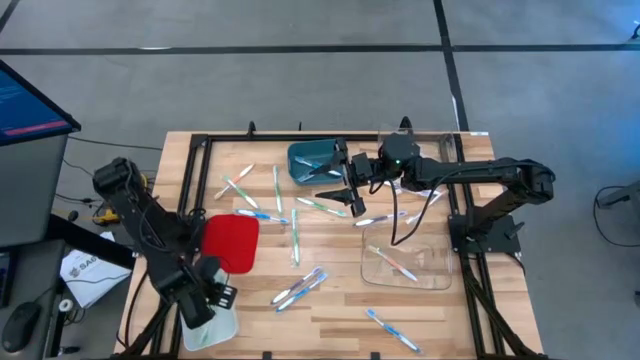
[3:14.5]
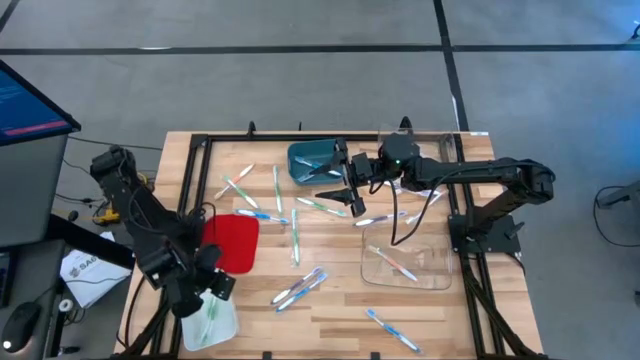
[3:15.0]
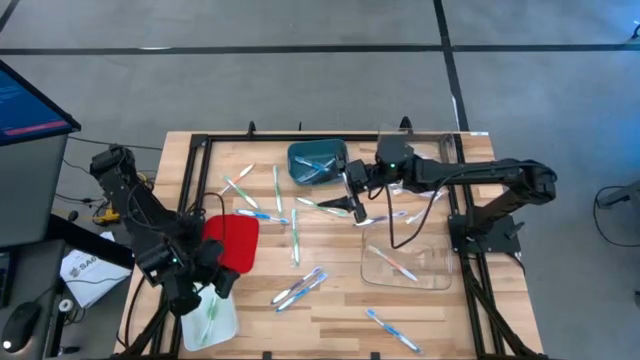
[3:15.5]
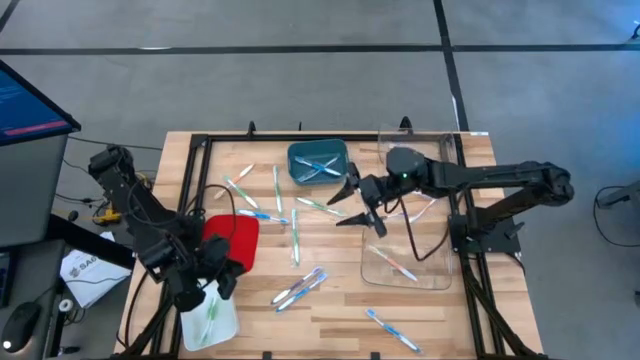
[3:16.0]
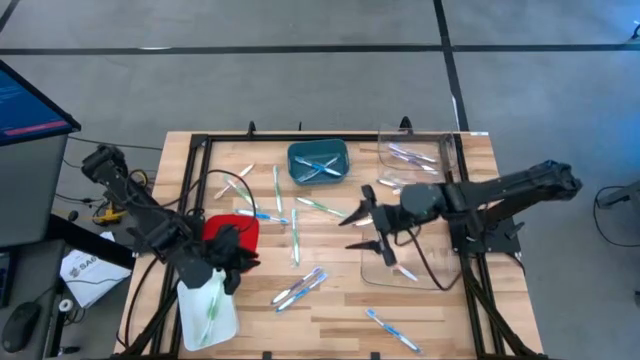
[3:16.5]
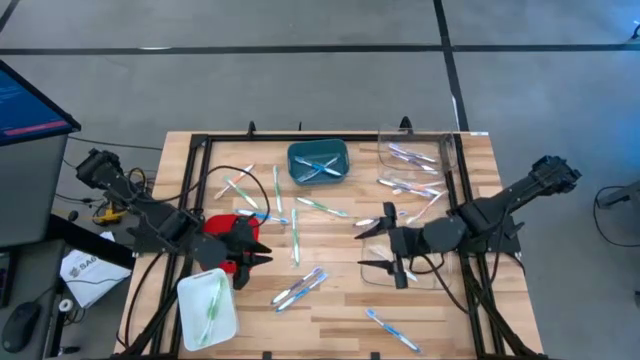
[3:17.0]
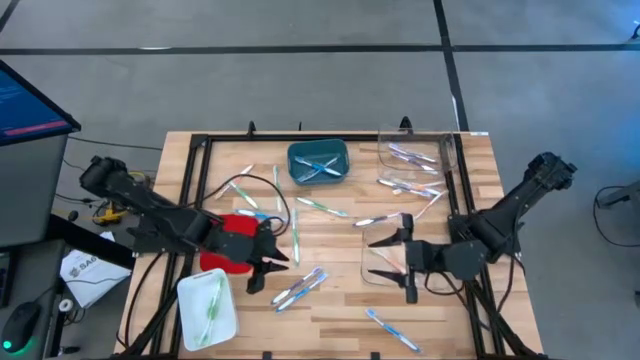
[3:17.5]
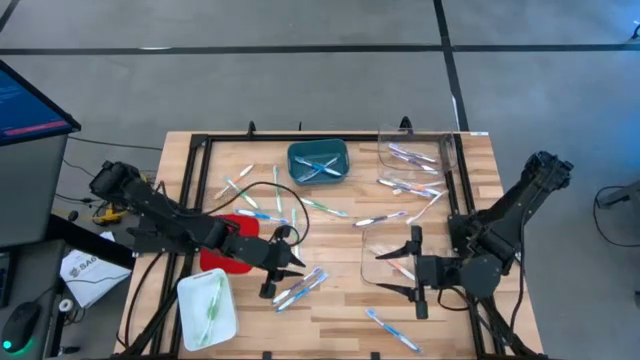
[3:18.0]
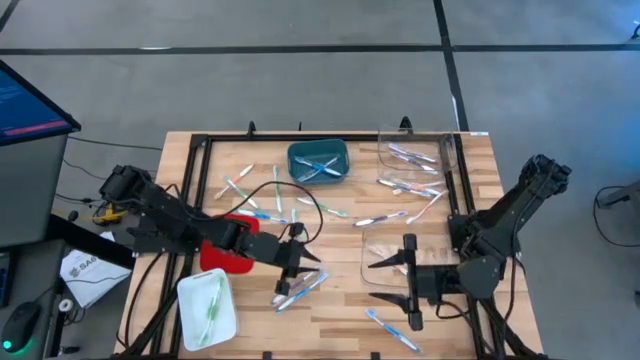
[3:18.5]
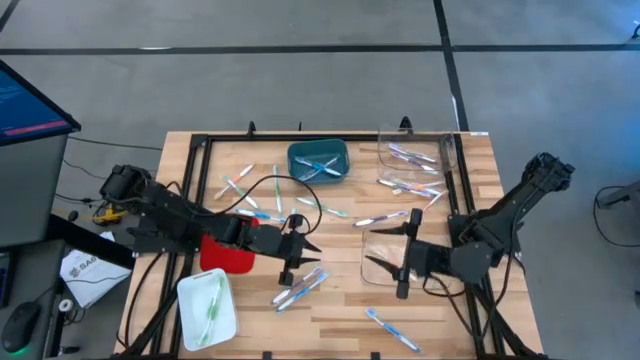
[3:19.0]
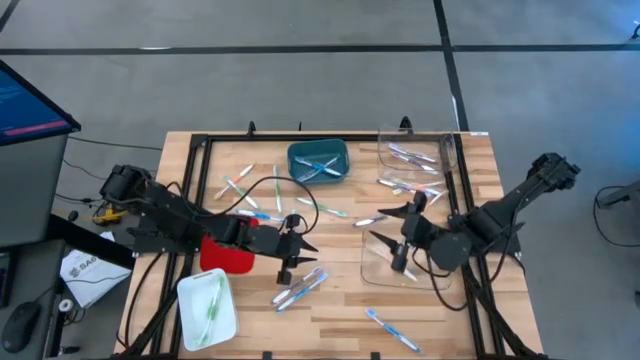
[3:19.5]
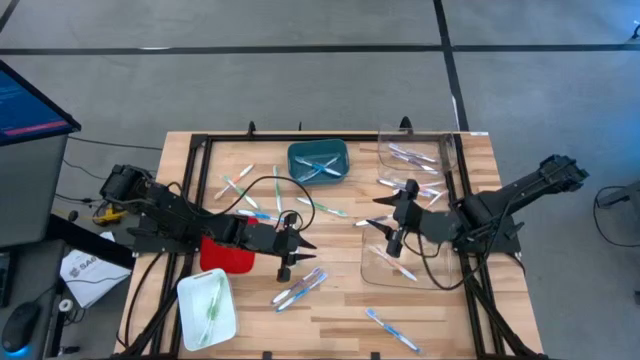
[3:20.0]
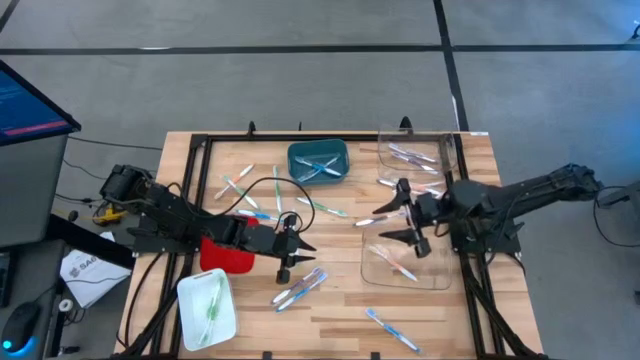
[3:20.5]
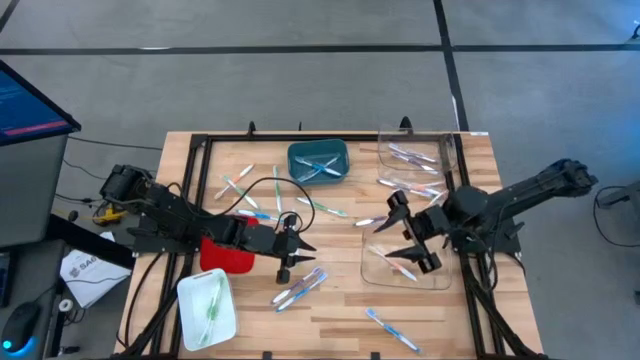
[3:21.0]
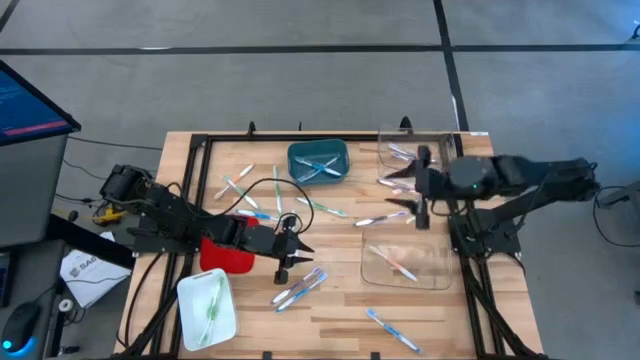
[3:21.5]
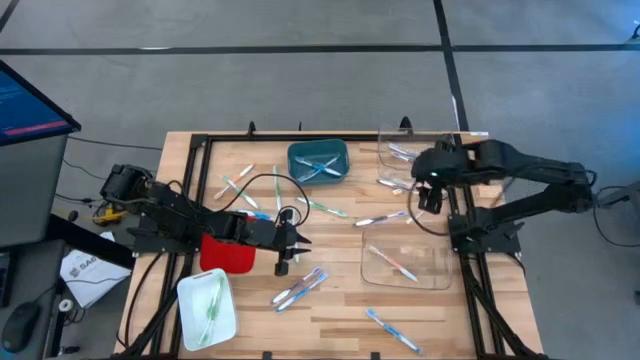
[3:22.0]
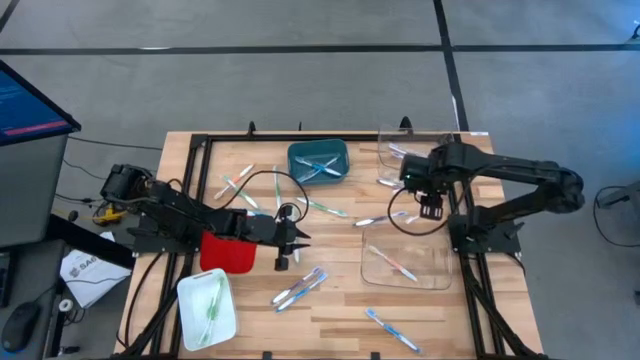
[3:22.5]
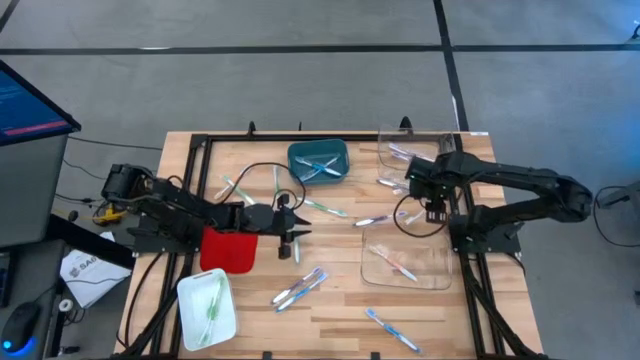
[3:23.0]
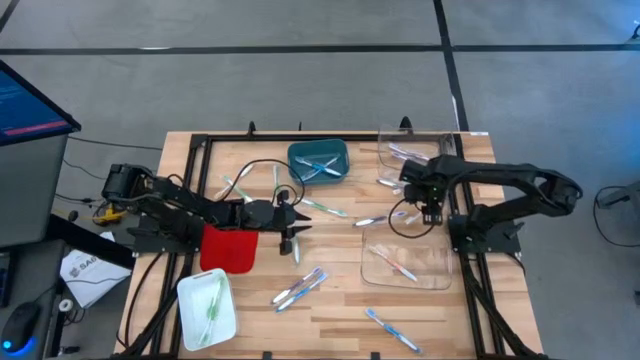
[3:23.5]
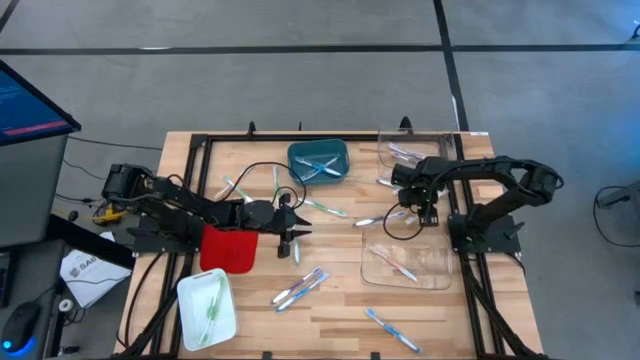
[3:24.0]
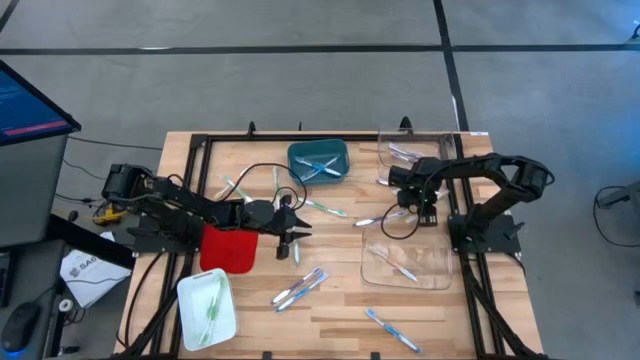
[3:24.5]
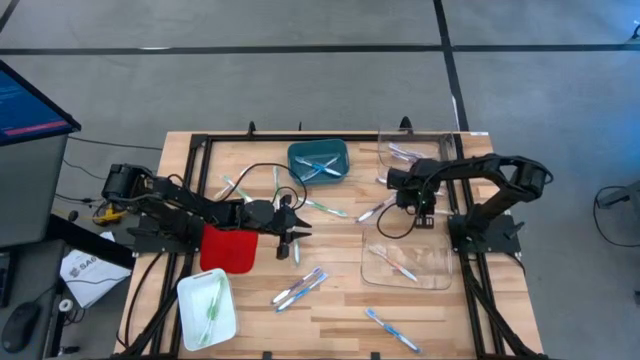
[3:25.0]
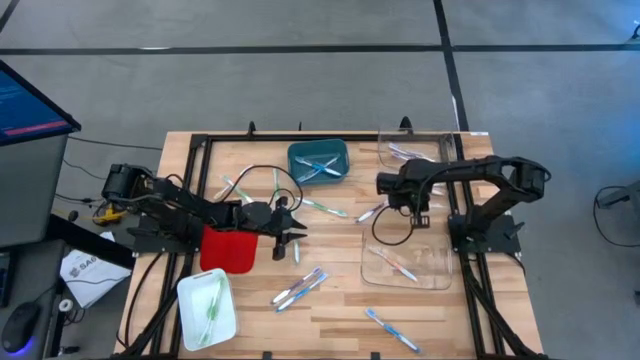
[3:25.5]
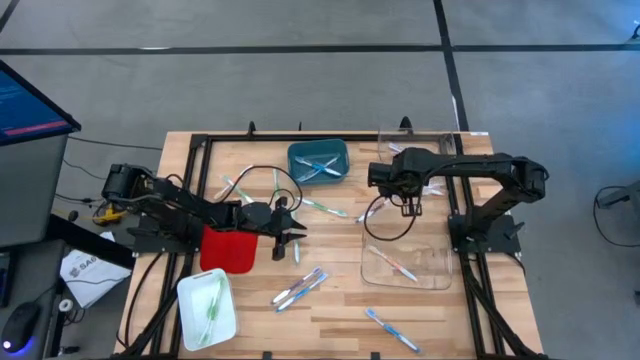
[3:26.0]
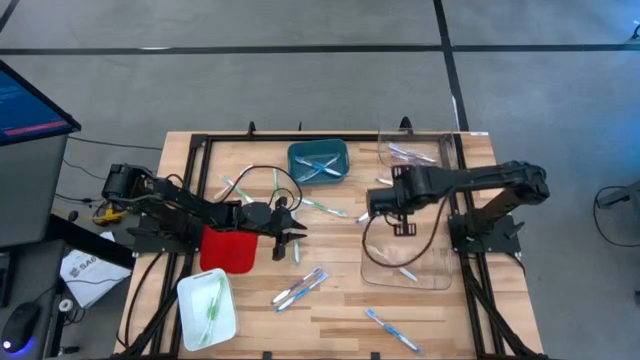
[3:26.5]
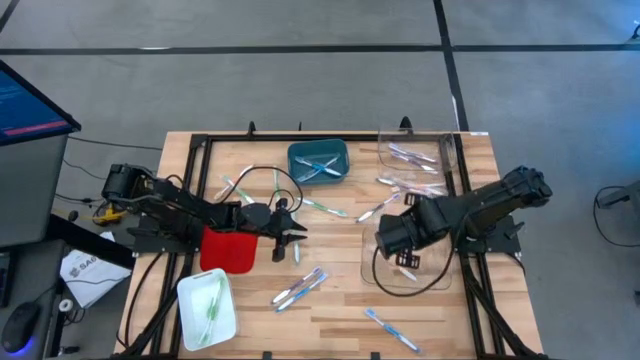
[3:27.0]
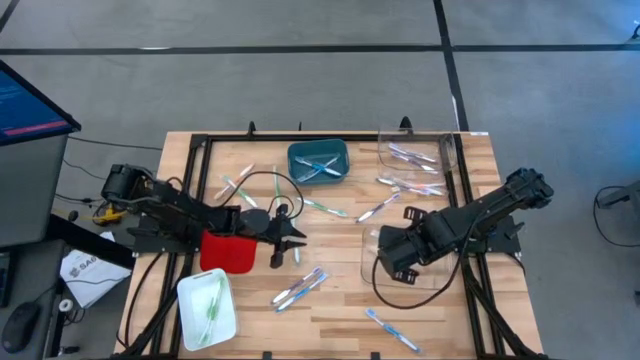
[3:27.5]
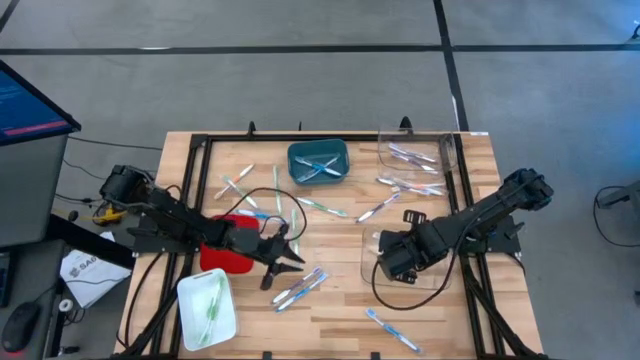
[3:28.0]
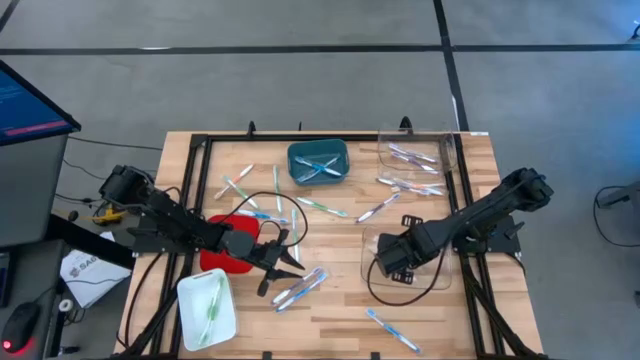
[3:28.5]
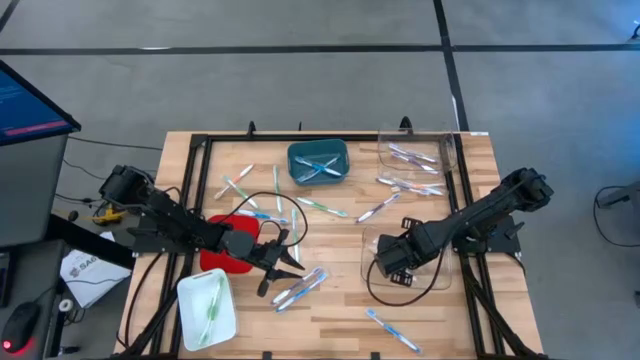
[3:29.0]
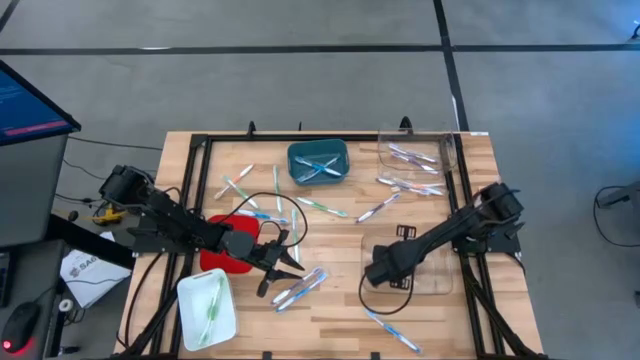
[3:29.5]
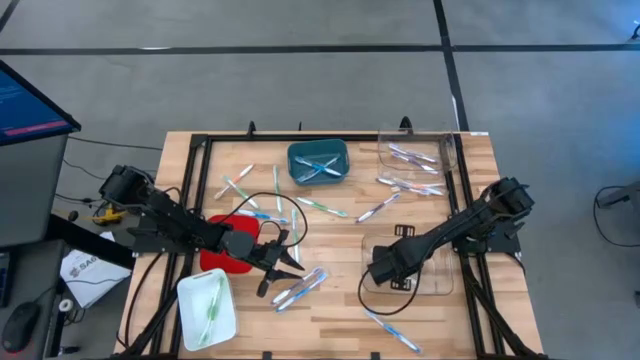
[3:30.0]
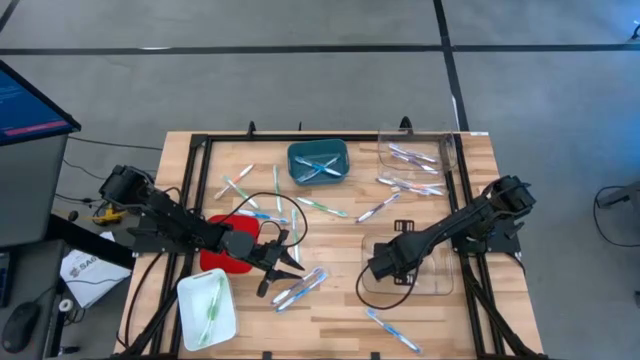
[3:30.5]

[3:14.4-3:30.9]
Task: Pick & Place Toothbrushes
Put the orange toothbrush into the bottom transparent bin

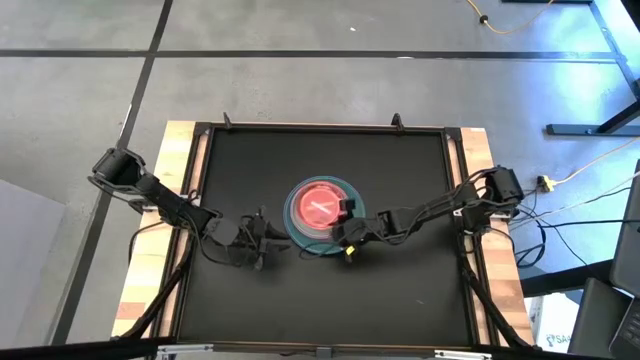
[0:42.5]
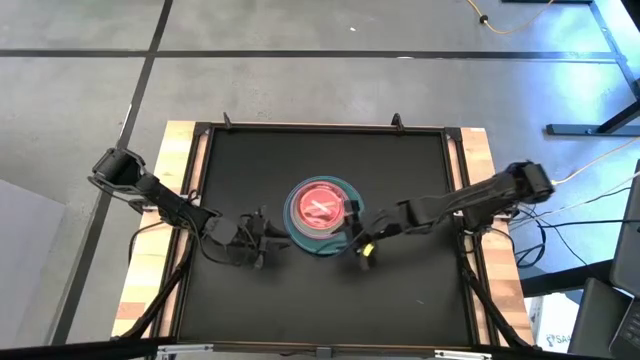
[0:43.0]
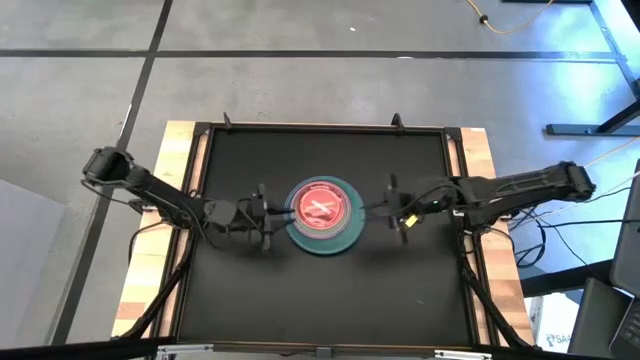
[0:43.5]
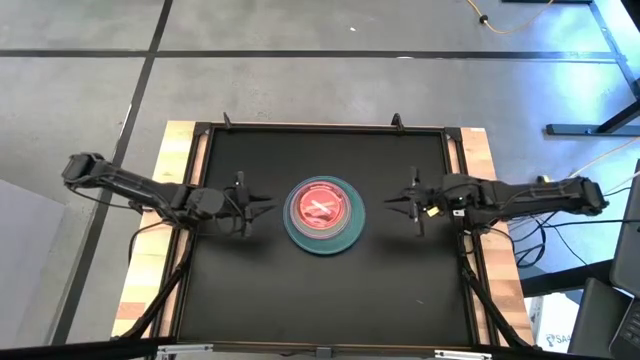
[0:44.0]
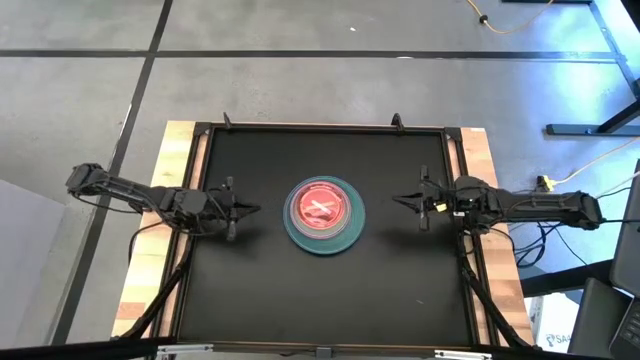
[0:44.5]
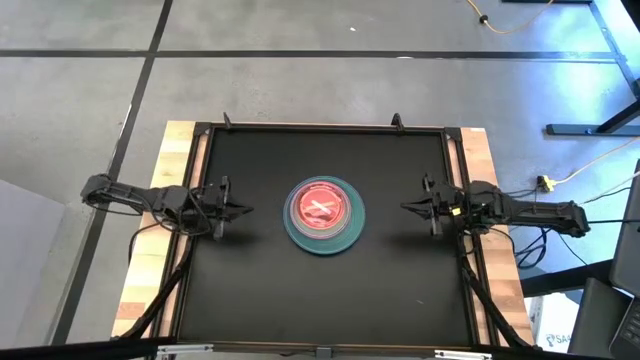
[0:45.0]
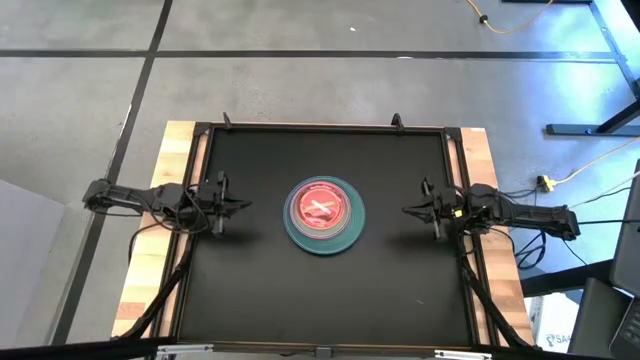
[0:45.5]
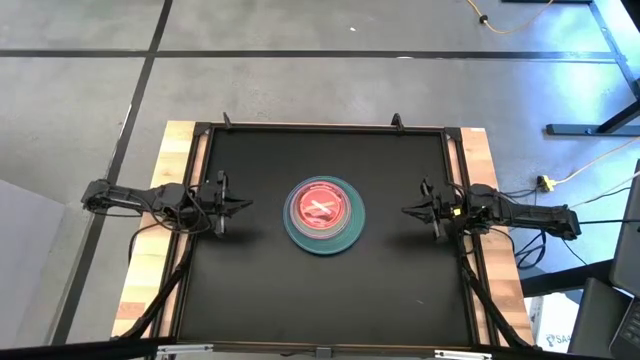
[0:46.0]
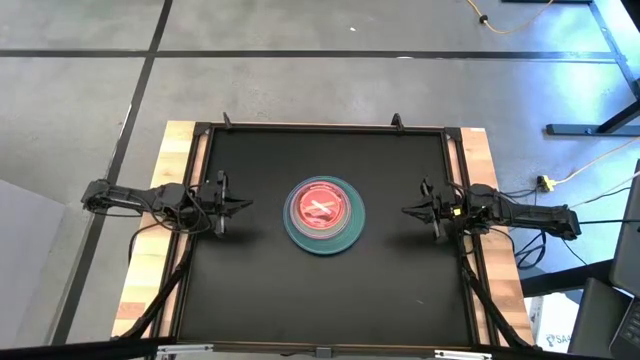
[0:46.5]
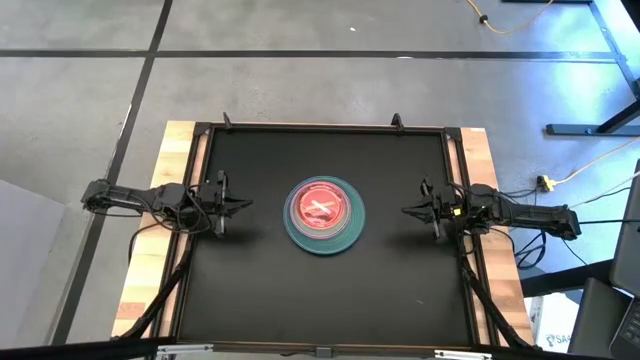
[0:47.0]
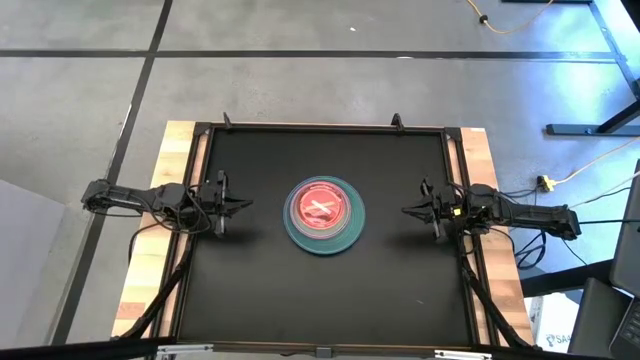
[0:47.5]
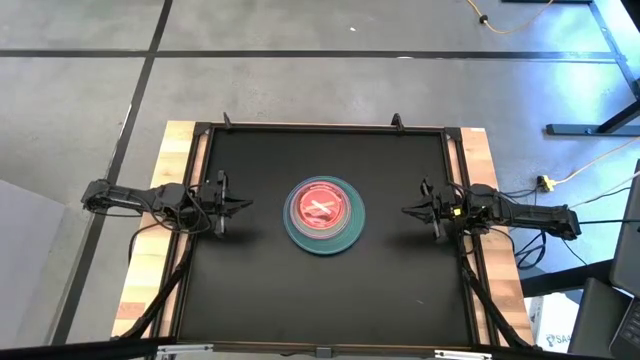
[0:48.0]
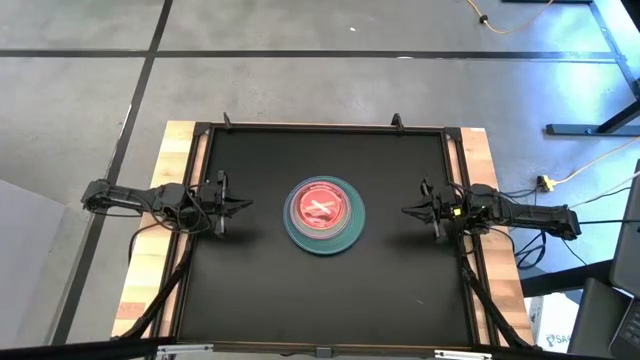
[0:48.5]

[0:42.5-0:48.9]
Task: Stack plastic plates
Return to Home Position
